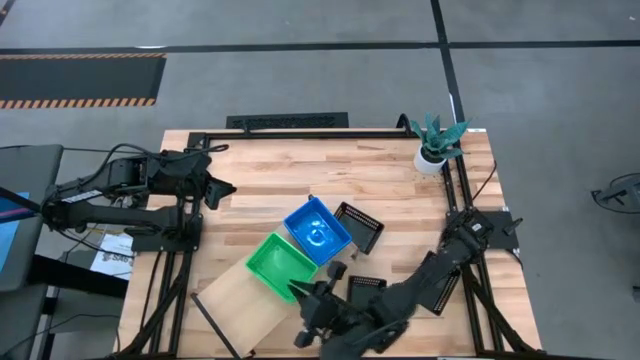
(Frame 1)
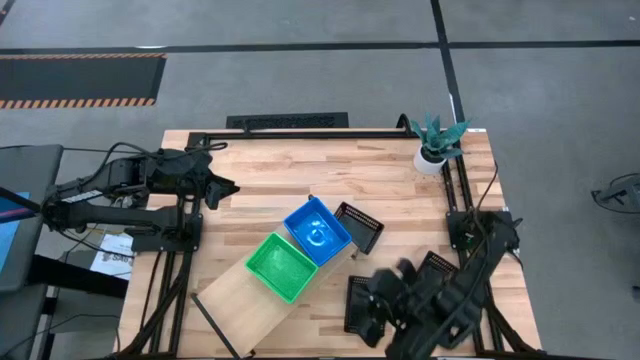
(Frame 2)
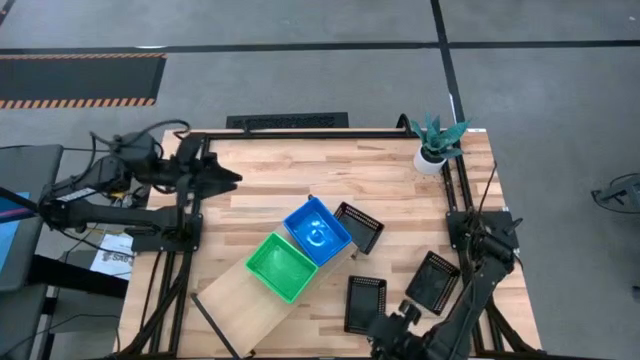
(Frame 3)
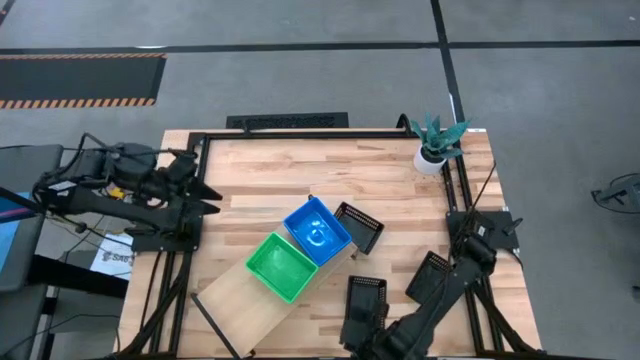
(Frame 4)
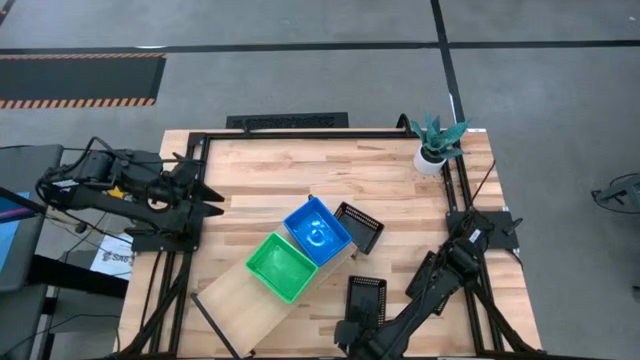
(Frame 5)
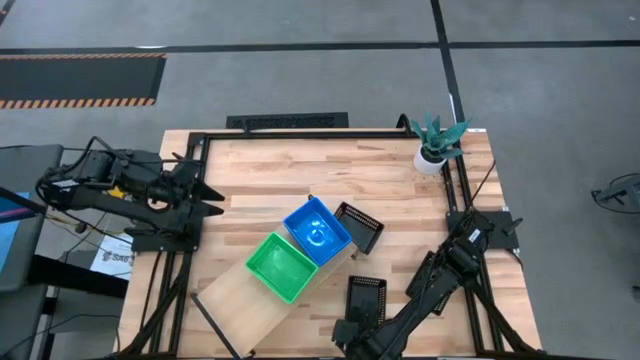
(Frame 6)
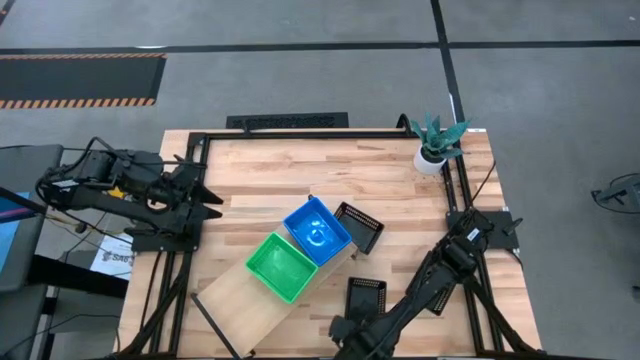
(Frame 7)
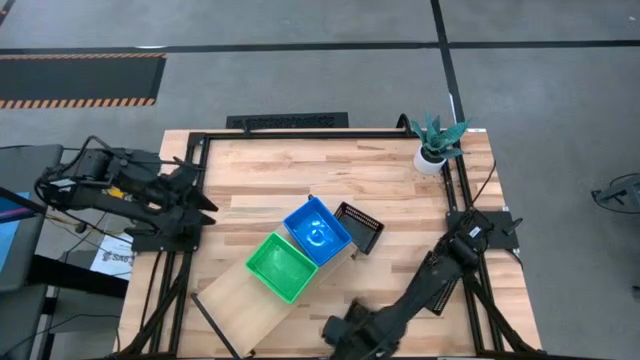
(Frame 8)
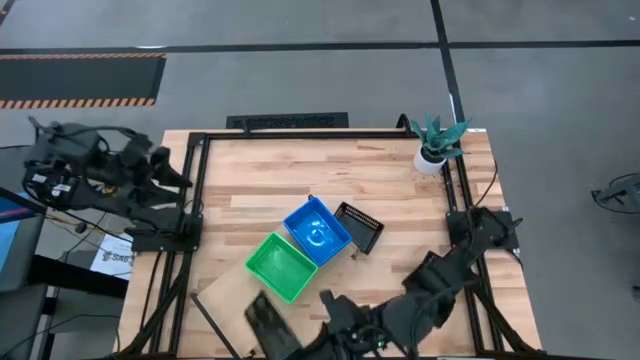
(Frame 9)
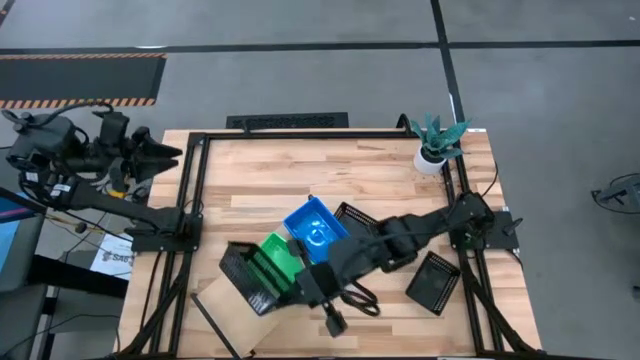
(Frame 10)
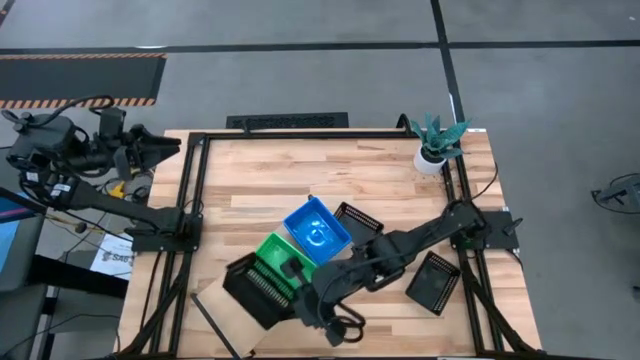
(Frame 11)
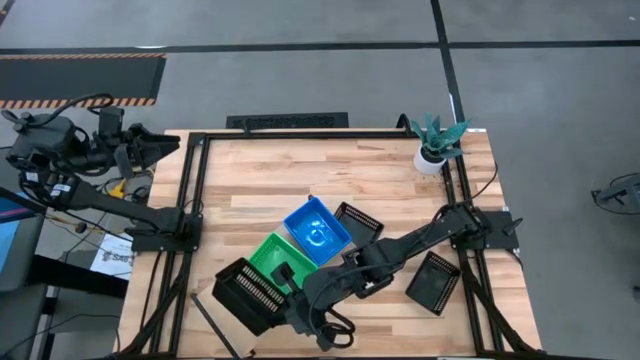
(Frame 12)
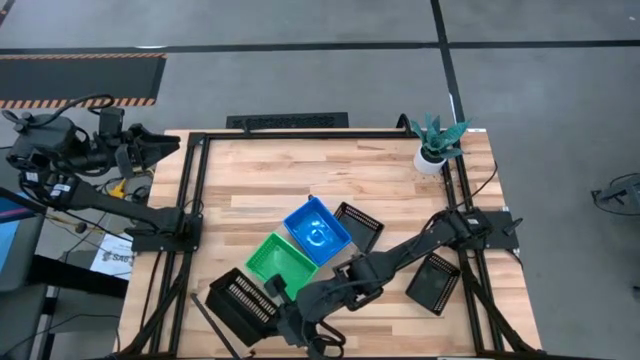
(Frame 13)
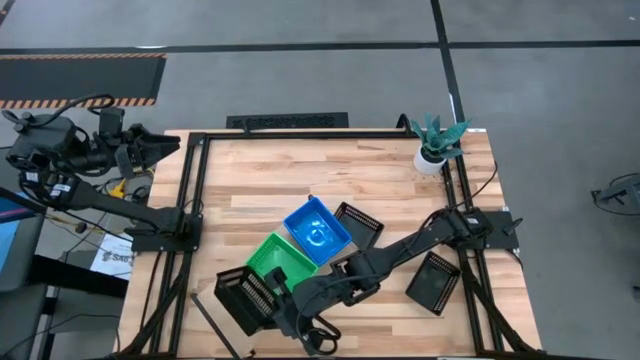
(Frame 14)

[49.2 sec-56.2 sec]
Task: Stack baskets on shelf by color
Put the bottom black bin on the shelf

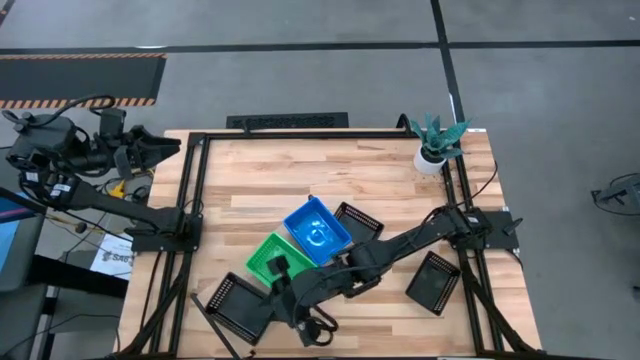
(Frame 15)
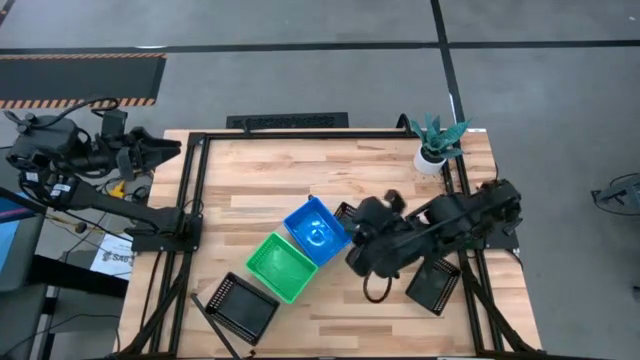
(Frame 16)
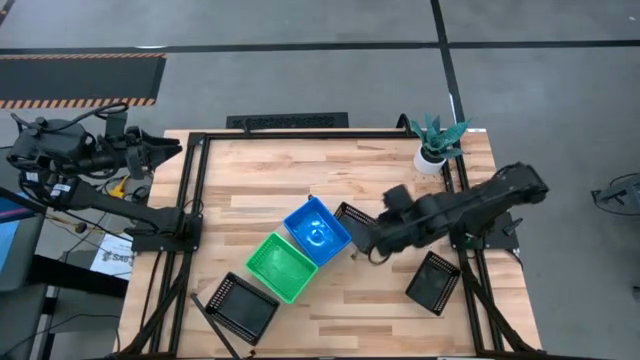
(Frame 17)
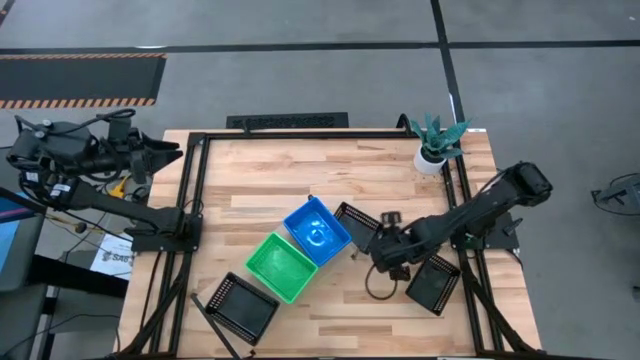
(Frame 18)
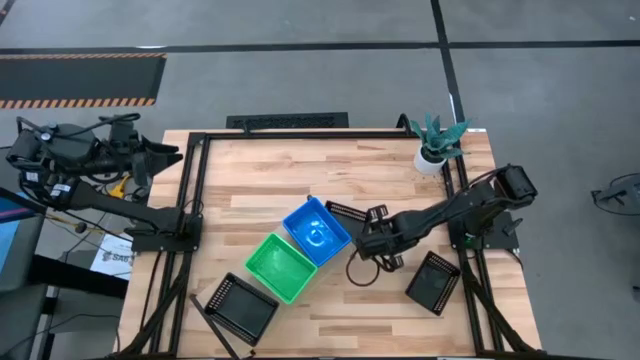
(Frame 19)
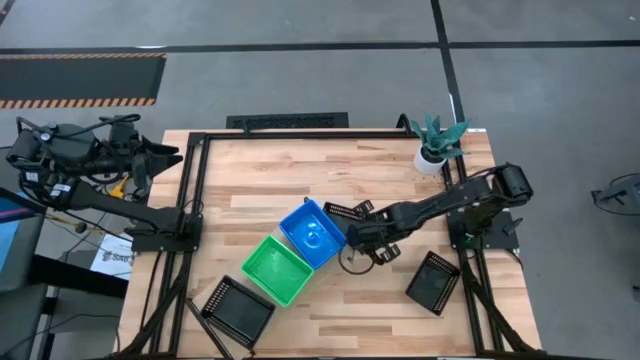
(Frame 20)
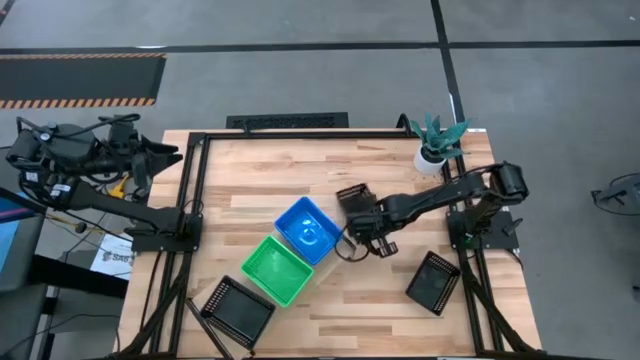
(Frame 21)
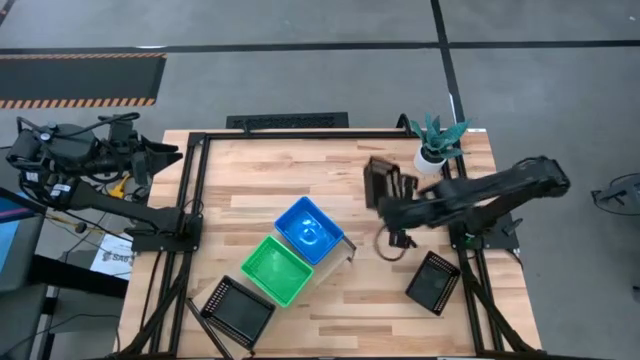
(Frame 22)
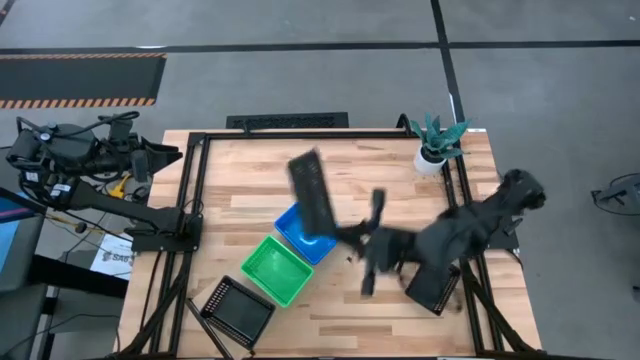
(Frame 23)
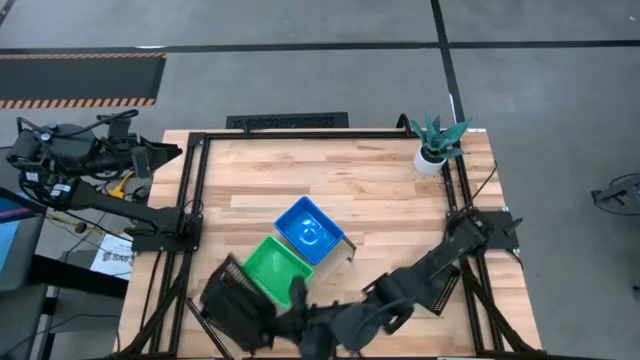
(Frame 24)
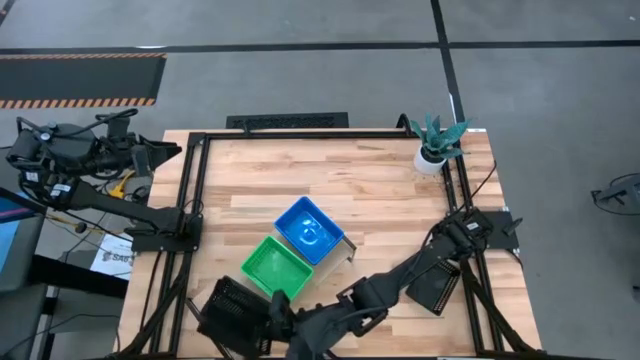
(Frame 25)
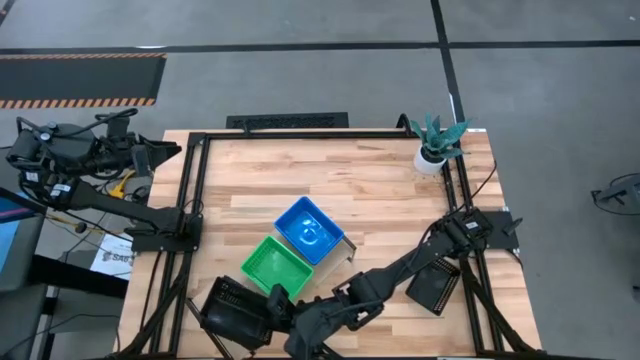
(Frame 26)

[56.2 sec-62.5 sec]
Stack the top black bin on the black bin on the shelf

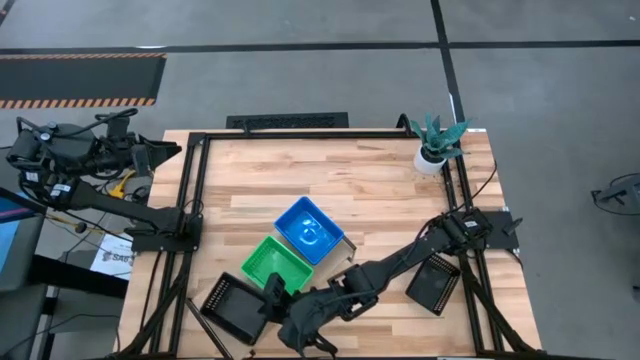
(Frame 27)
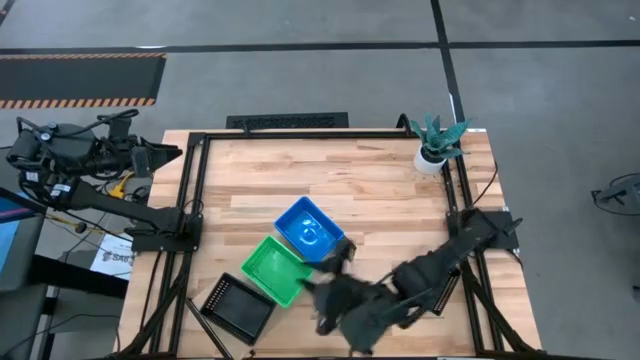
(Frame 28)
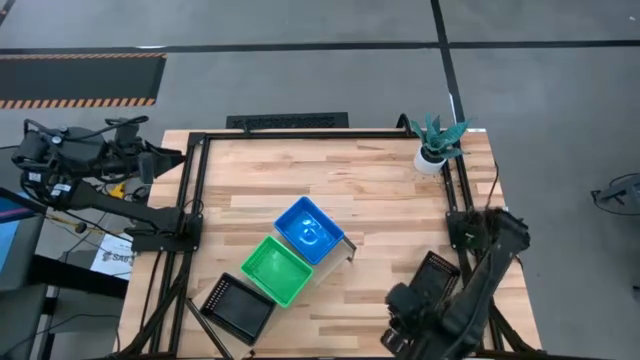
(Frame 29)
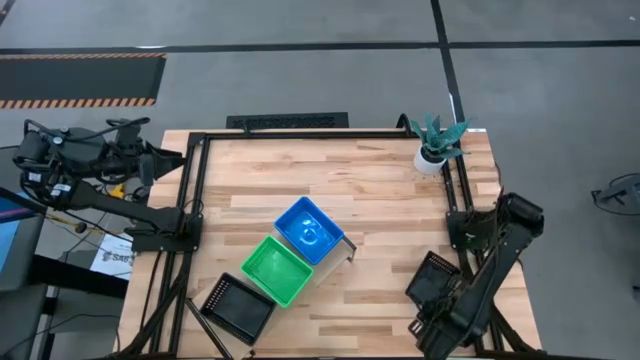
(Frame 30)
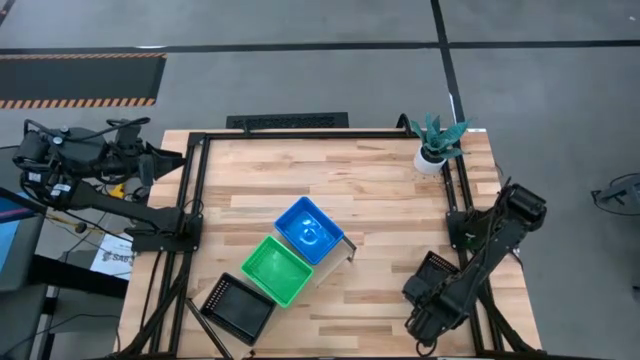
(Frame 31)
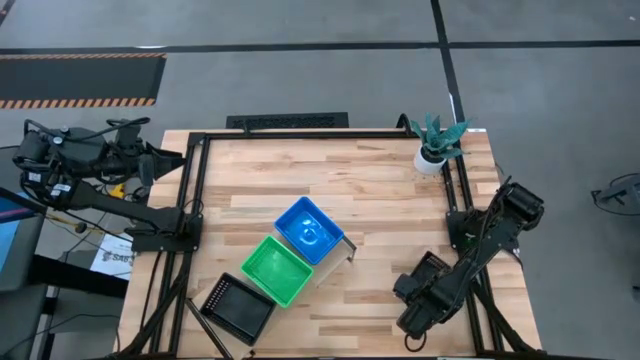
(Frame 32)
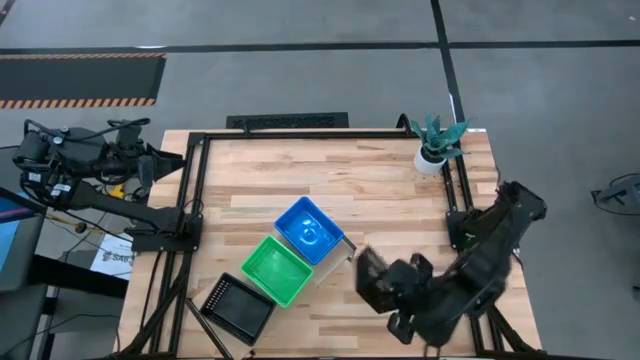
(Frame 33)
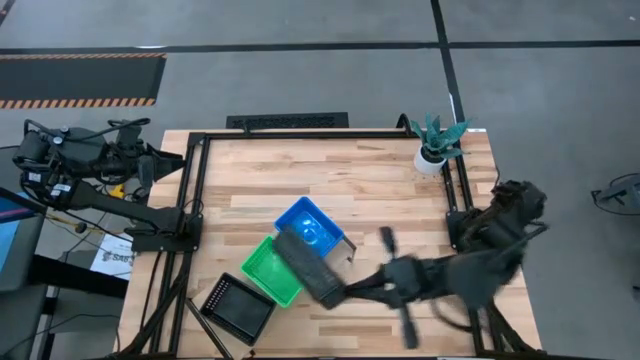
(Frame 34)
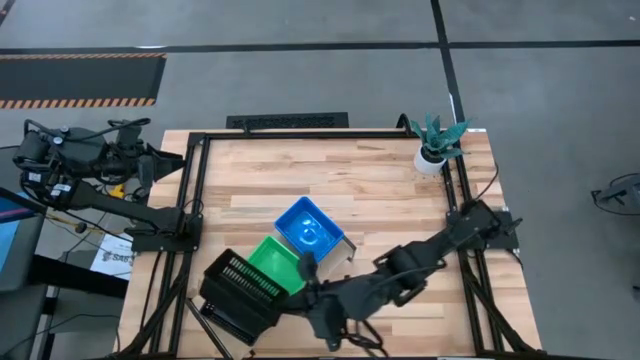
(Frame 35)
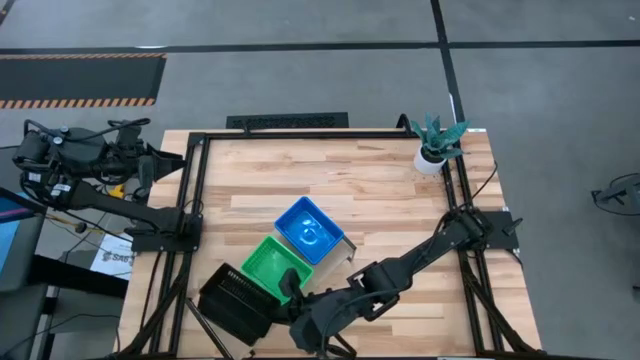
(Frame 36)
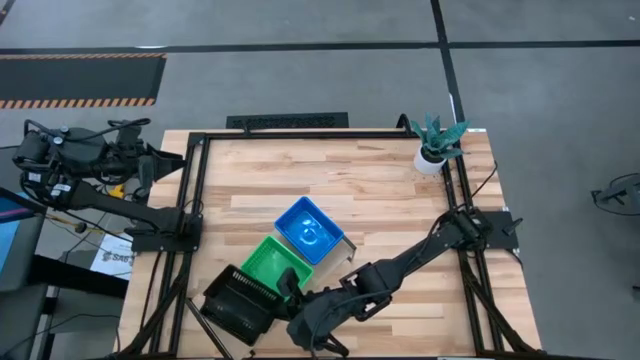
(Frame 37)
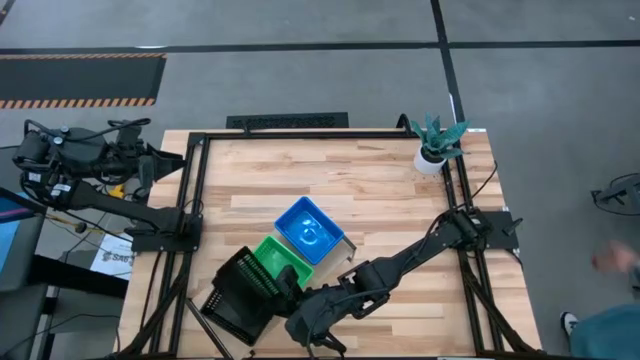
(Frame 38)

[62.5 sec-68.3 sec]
Stack the black bin on the black bin on the shelf

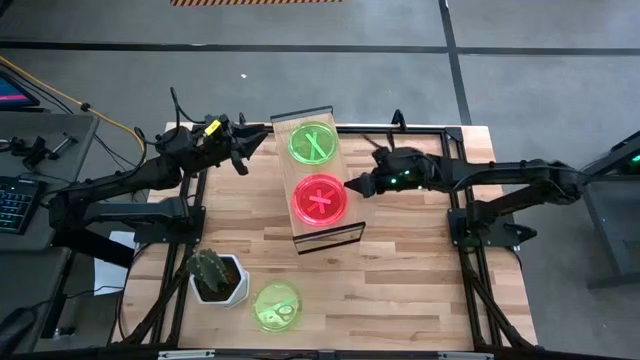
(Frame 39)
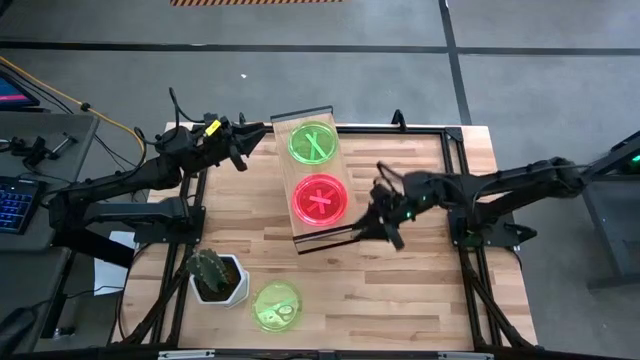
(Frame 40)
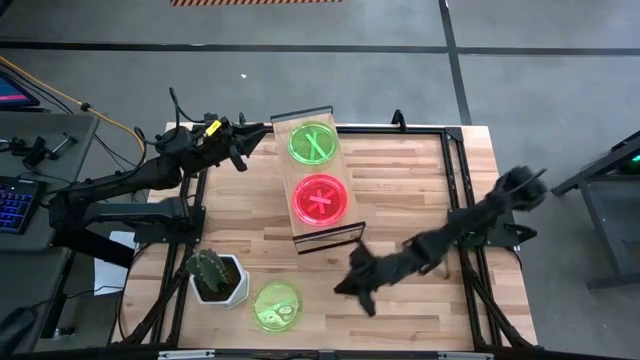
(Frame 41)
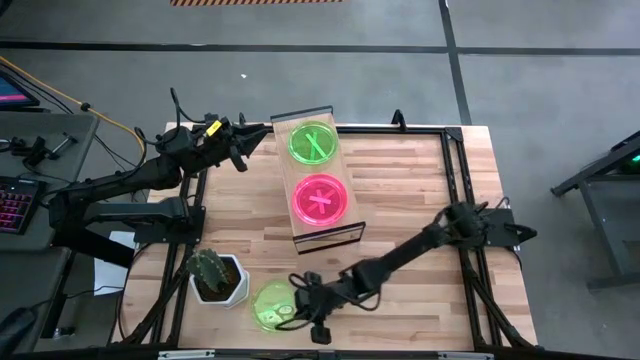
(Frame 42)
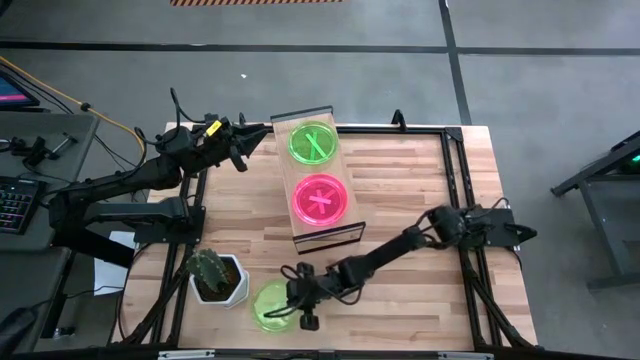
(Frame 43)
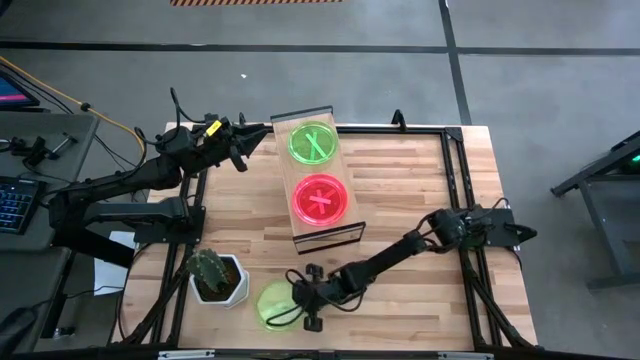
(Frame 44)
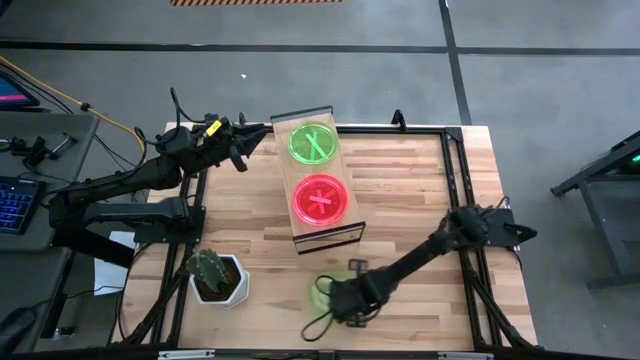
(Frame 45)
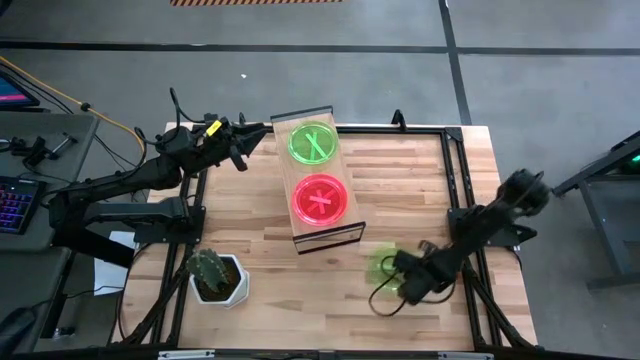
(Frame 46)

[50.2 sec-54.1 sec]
Task: Place and stack plates onto a shelf
Move the green plate to the middle of the table
